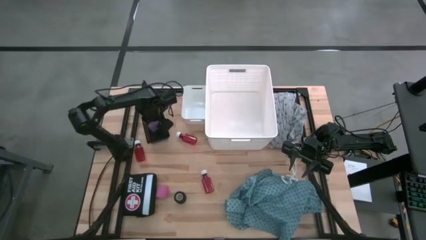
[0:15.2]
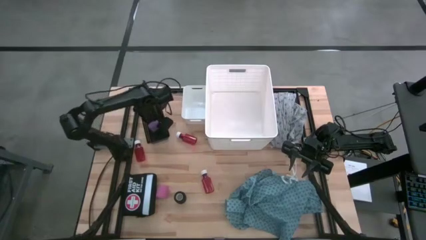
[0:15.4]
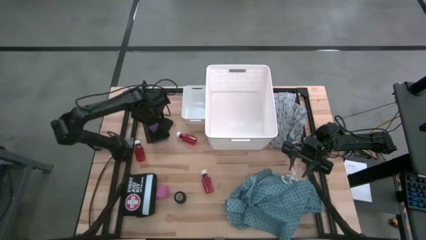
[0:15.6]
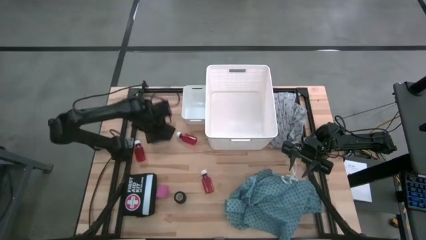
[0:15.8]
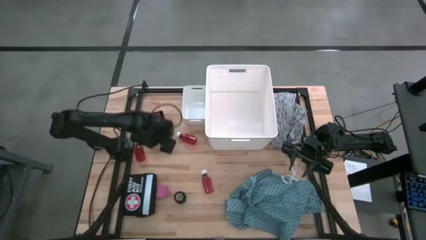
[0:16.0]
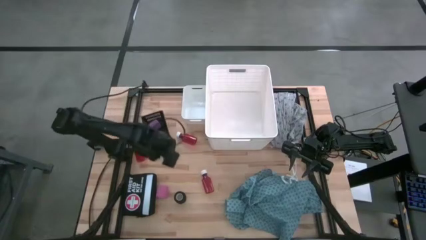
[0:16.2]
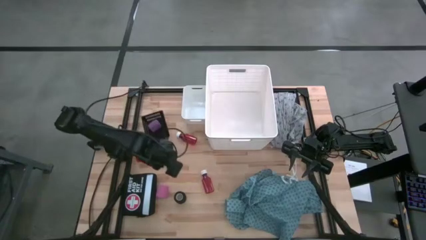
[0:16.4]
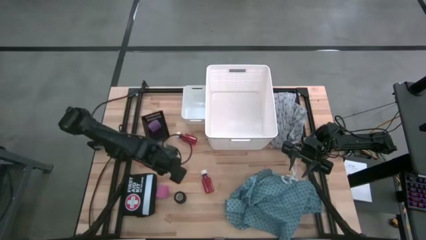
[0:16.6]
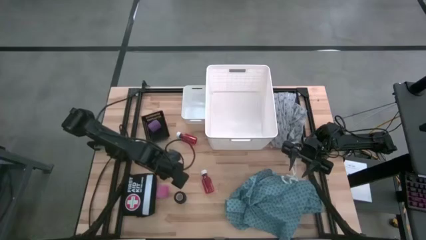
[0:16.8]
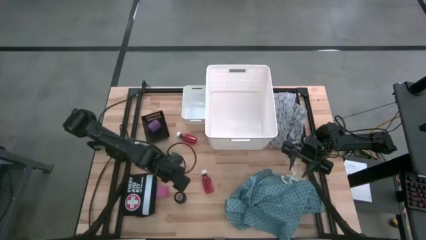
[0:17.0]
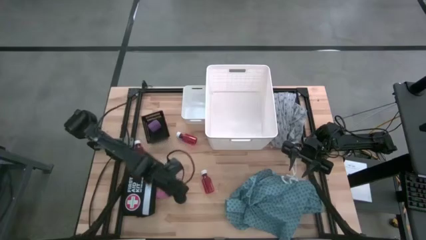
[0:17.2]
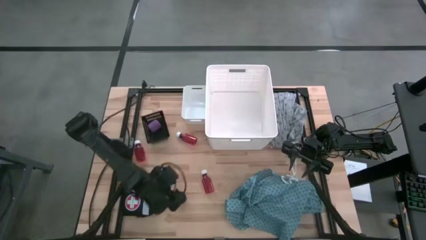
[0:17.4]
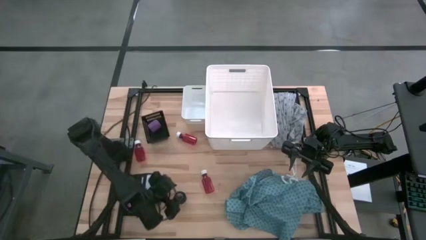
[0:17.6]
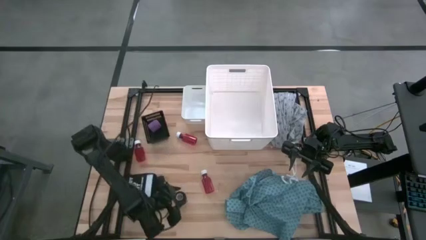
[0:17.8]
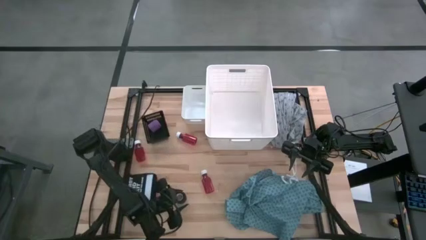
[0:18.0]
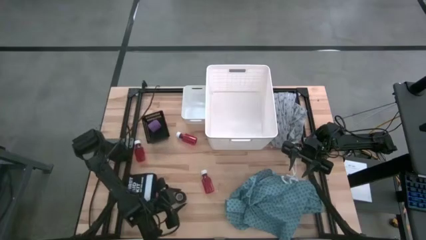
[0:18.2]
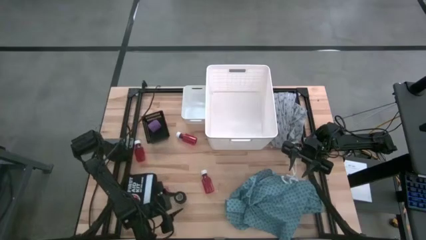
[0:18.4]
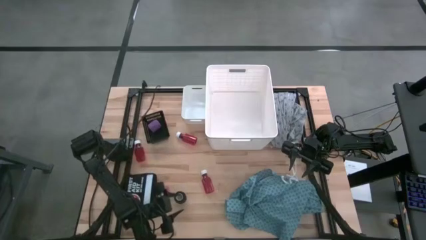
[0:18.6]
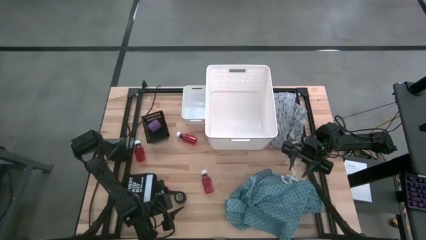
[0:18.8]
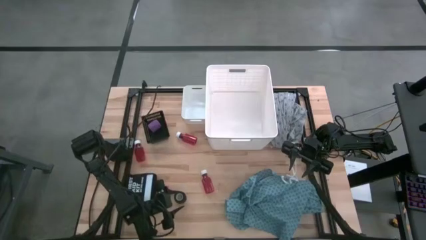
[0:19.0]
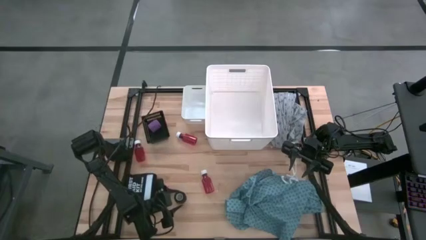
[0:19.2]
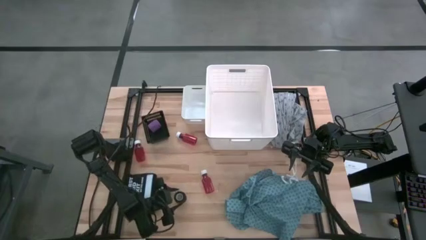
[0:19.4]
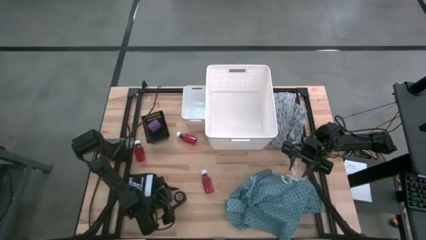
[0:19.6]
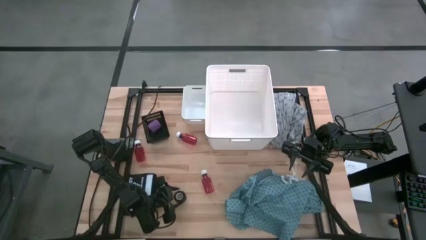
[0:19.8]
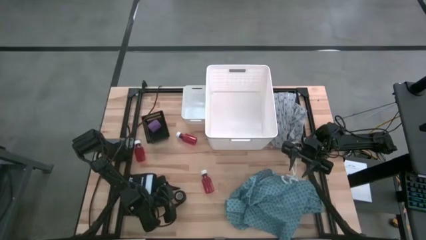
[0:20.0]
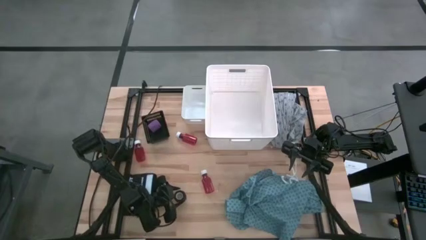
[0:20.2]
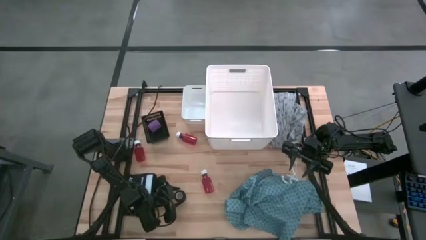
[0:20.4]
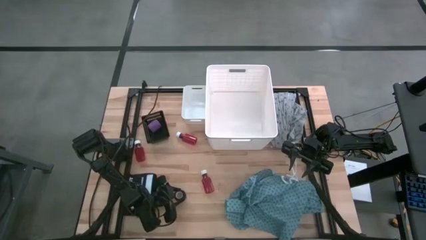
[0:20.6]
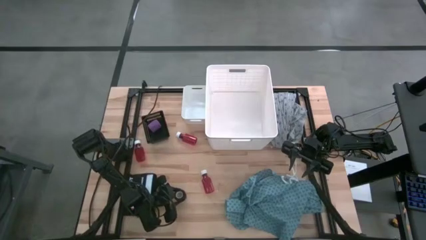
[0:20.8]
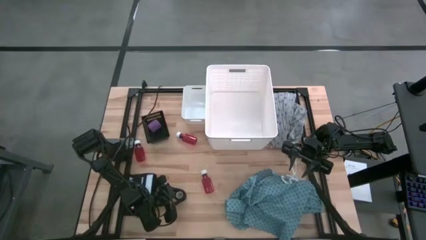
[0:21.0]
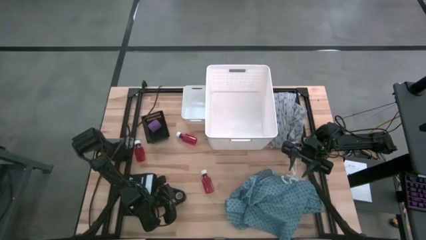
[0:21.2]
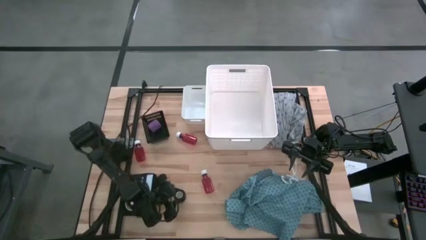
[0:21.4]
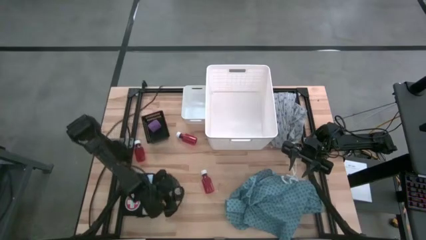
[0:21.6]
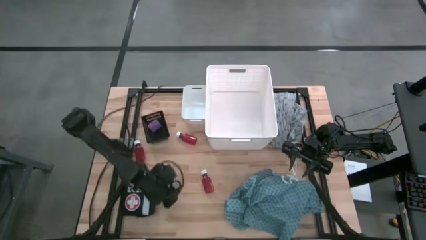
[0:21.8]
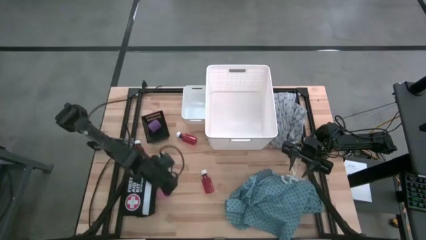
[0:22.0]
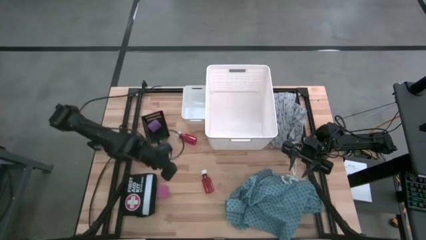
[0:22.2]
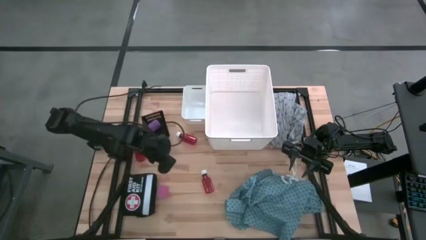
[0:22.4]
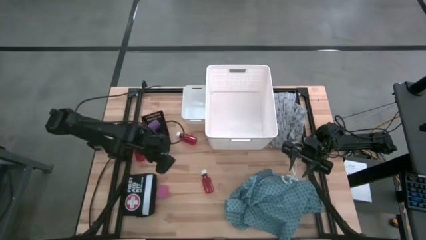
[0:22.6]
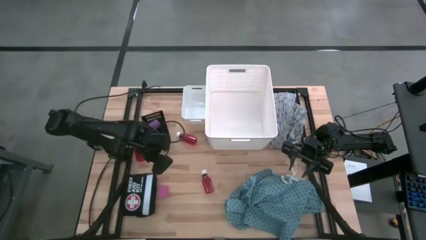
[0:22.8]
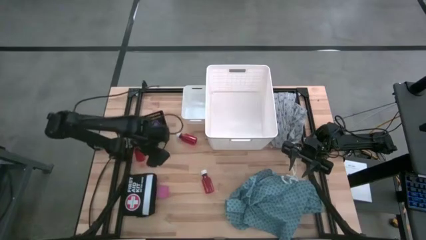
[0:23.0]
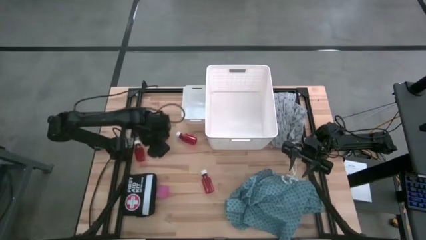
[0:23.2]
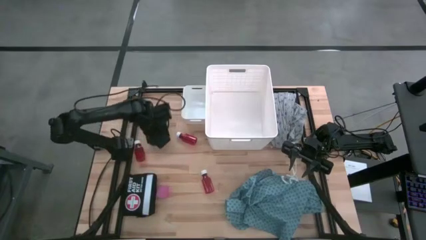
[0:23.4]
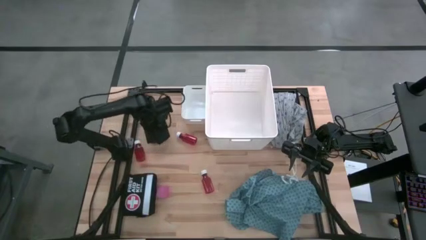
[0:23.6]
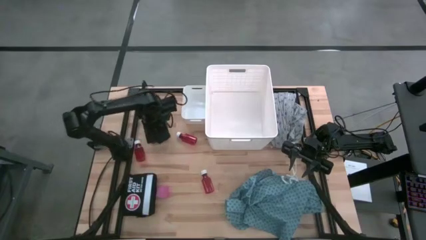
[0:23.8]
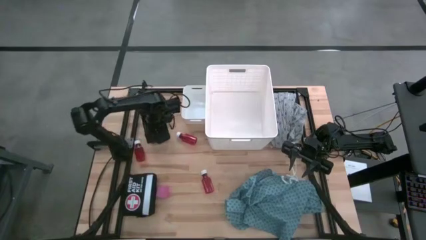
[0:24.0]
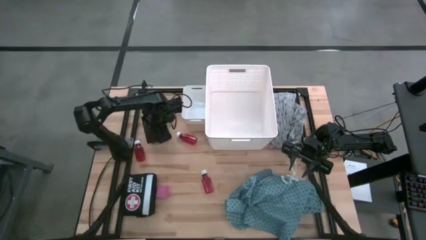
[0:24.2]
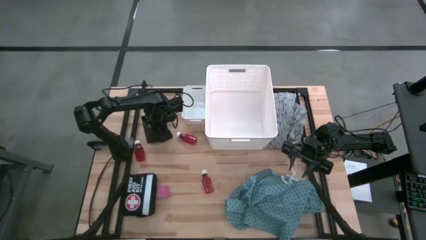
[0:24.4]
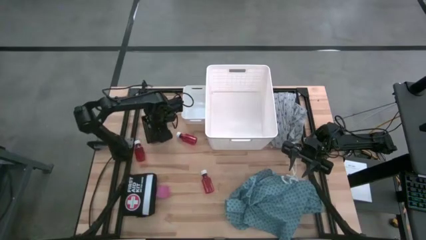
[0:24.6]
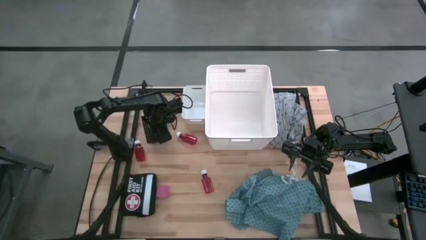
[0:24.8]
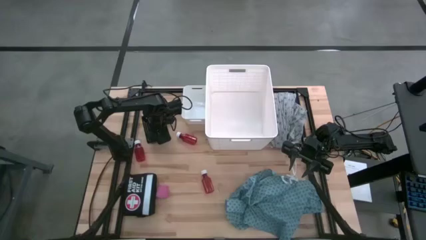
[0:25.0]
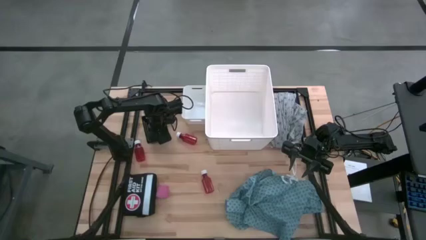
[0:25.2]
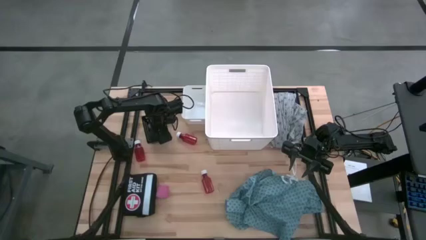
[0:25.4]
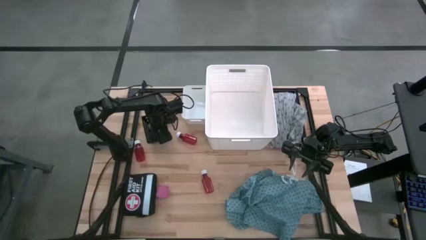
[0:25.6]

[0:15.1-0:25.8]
Task: Pick & Place Medicine items
Put the black bandage into the black bin

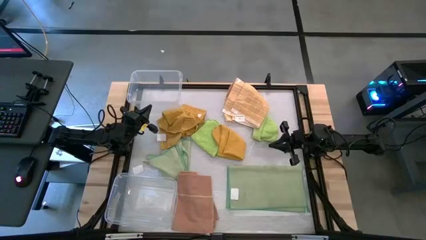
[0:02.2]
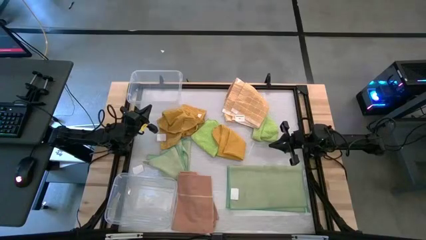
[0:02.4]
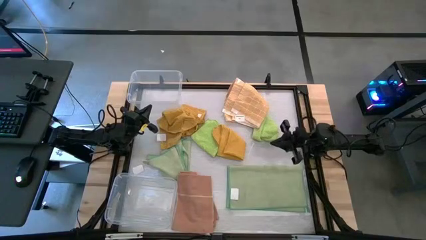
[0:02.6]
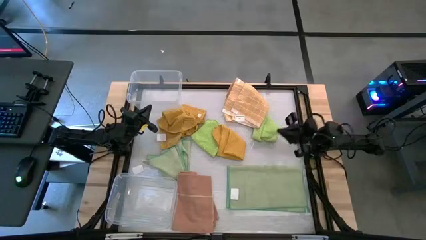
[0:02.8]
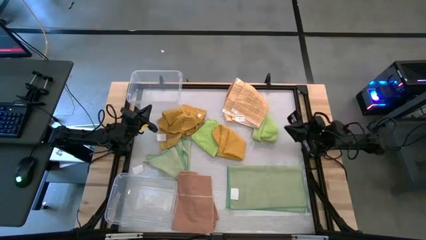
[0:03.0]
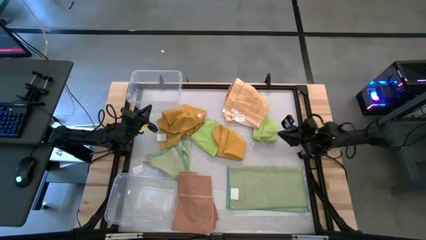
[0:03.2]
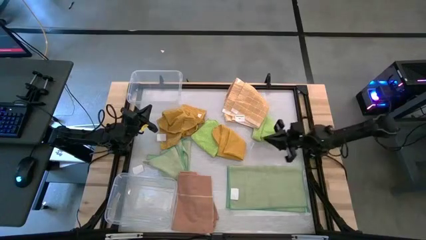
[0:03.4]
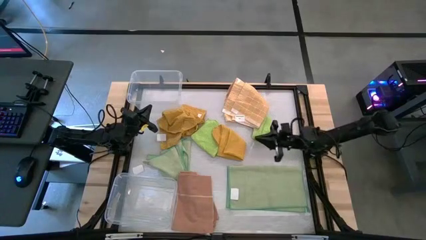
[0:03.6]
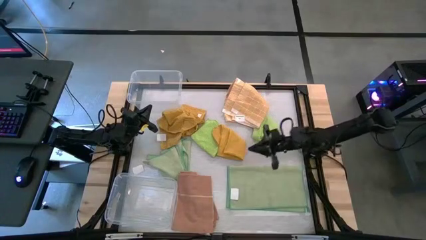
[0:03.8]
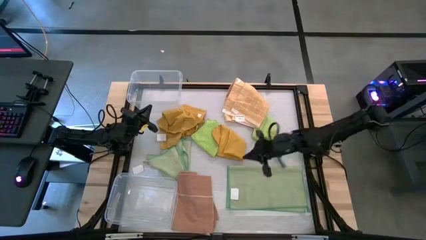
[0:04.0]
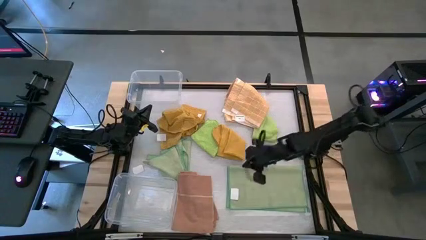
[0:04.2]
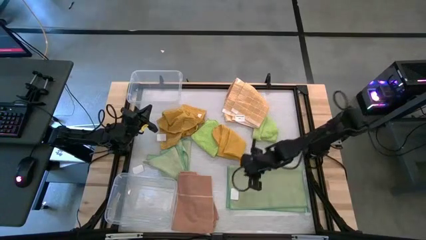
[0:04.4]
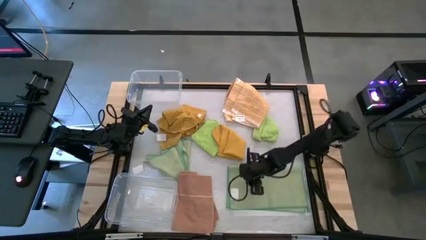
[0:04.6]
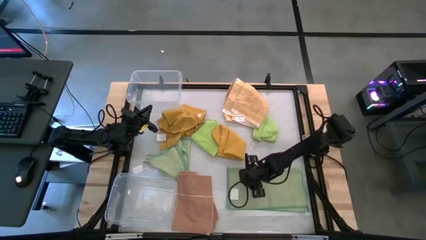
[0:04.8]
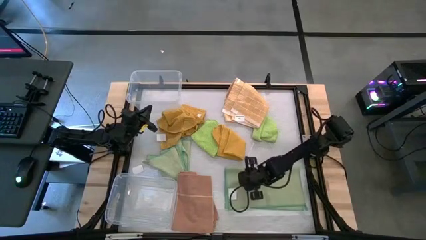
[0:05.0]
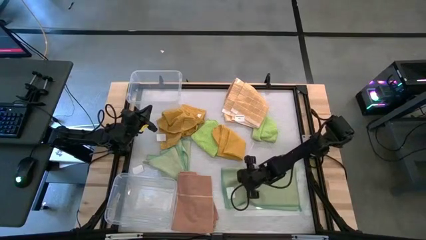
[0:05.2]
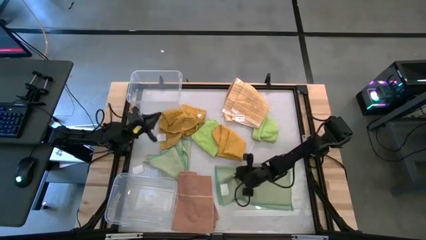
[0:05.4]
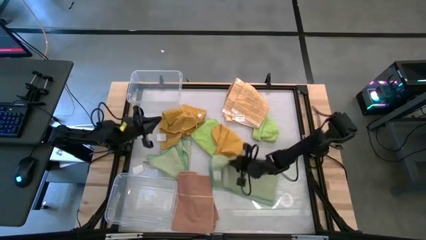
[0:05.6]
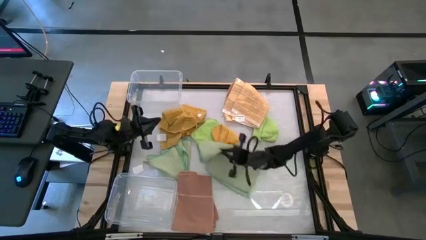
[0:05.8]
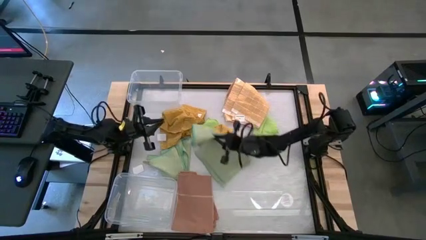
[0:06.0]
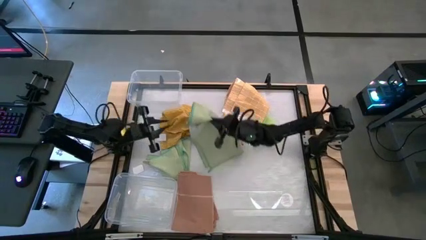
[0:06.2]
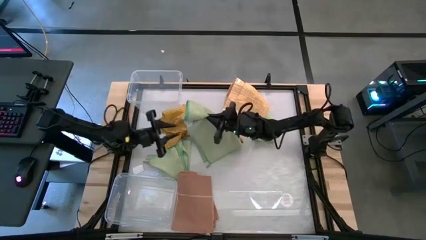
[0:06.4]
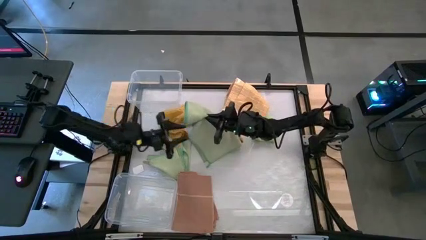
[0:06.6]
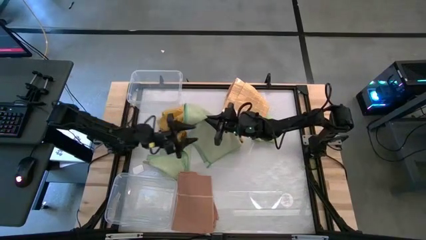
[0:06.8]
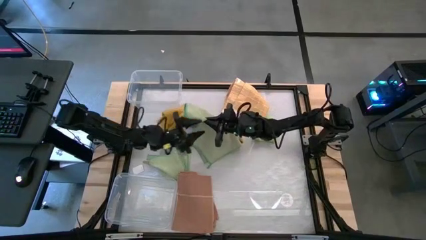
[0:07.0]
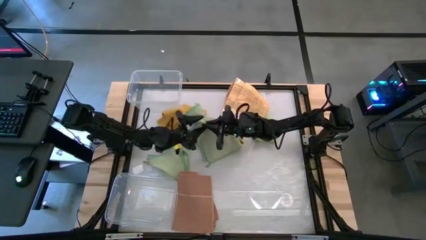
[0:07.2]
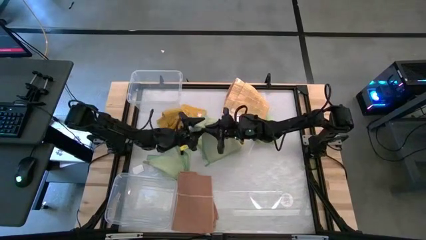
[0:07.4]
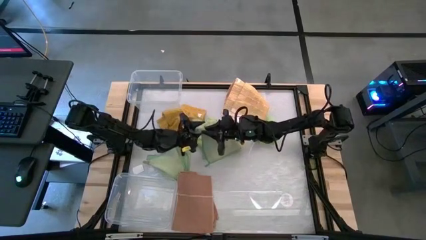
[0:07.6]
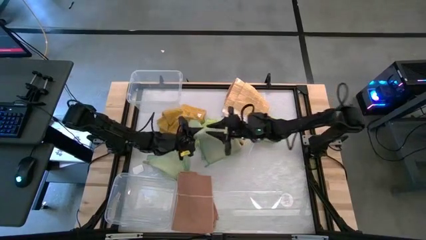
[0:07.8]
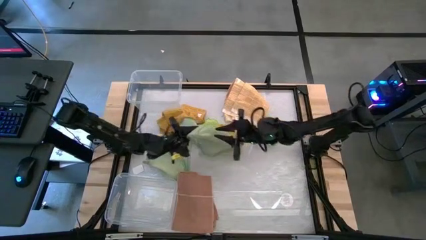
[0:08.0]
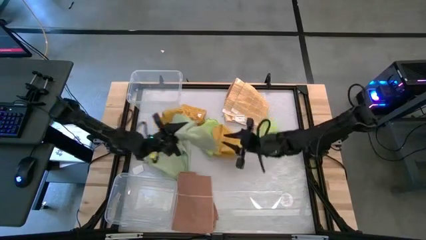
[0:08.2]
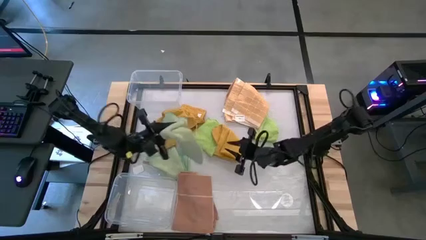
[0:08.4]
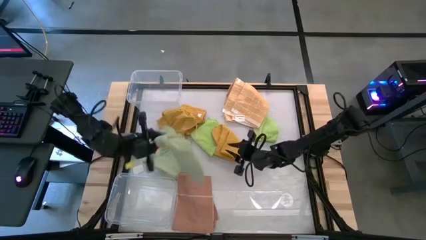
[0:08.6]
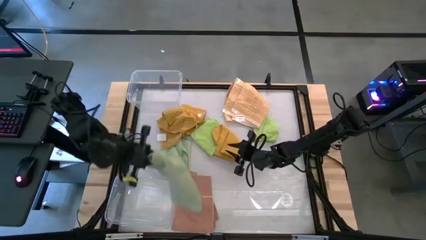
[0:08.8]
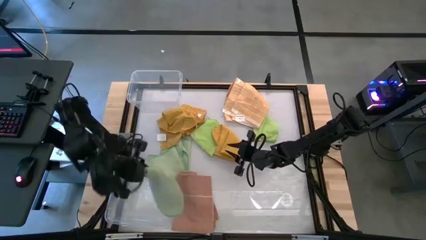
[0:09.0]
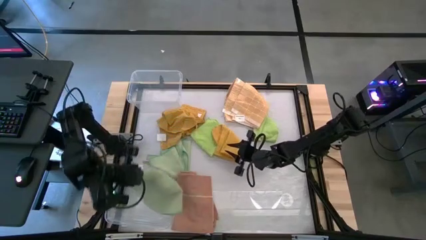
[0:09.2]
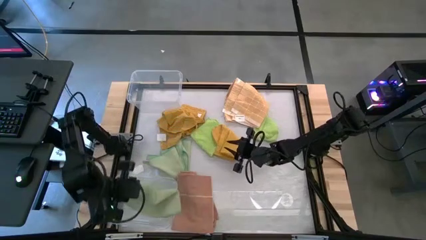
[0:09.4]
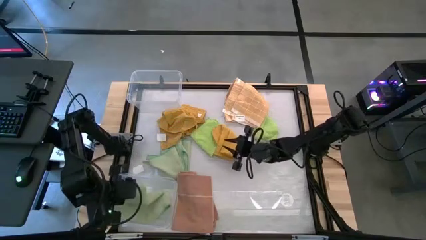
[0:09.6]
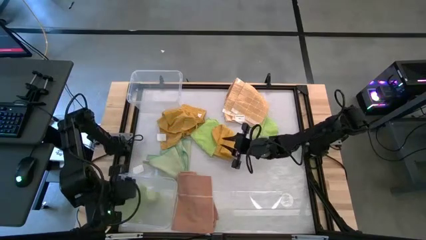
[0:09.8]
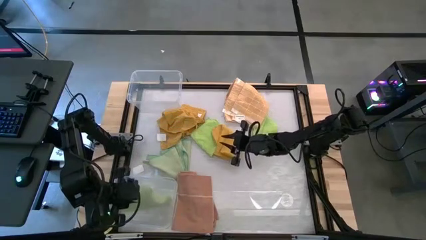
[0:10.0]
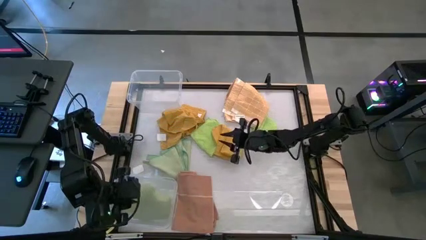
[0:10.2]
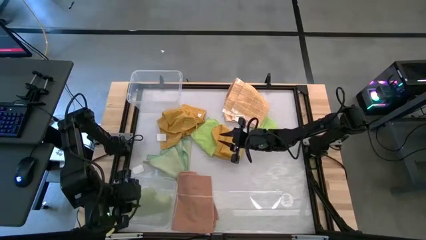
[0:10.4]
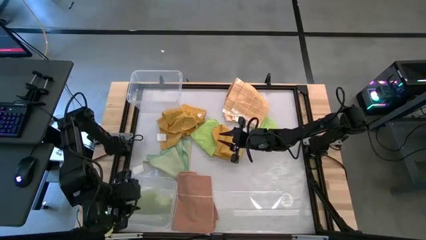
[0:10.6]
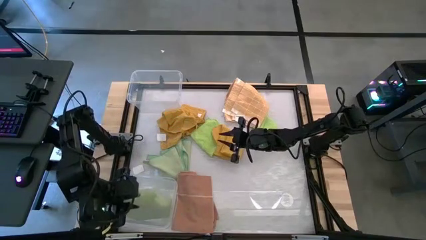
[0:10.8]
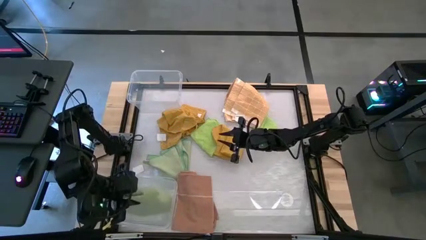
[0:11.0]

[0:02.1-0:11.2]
Task: Sort towels by color in basket
Put the right green towel into the bottom transparent bin
